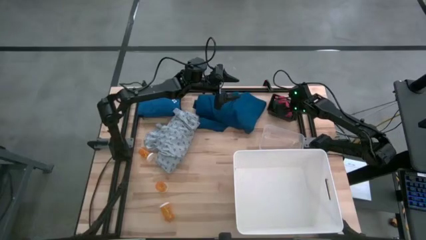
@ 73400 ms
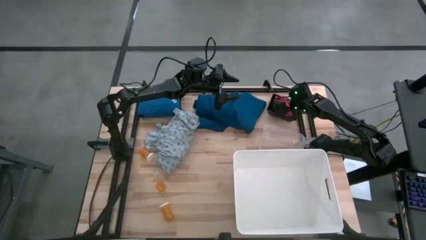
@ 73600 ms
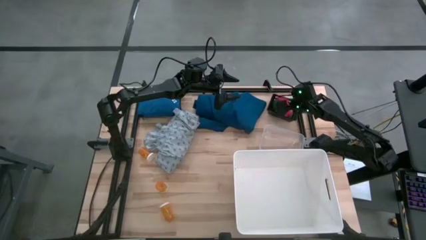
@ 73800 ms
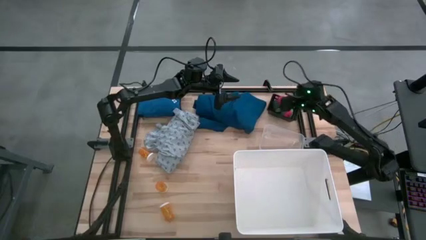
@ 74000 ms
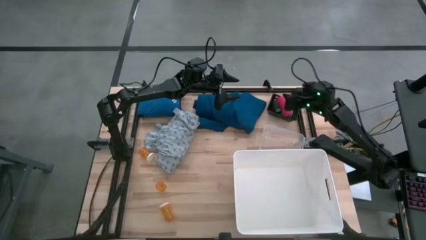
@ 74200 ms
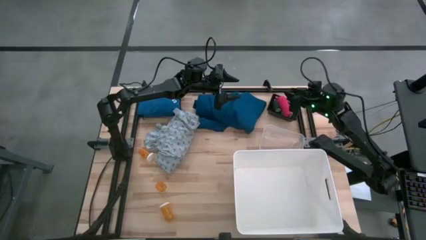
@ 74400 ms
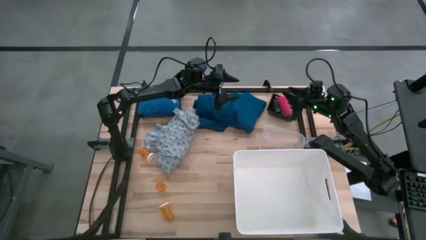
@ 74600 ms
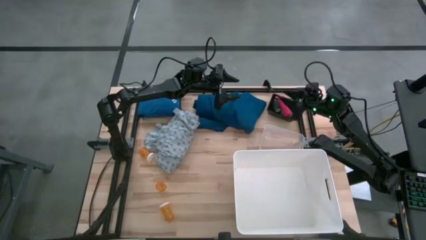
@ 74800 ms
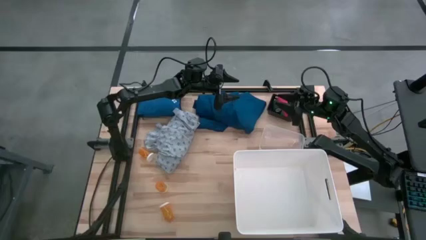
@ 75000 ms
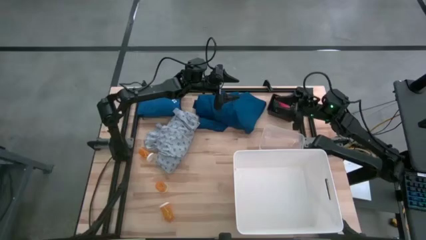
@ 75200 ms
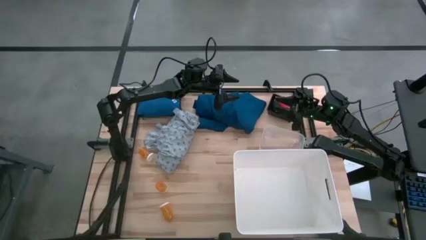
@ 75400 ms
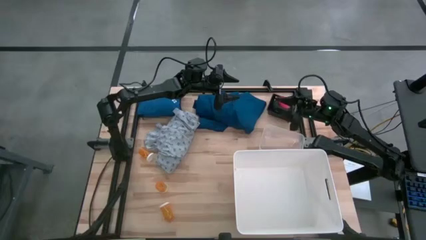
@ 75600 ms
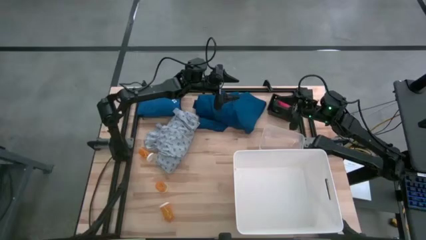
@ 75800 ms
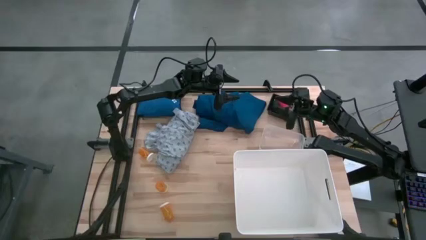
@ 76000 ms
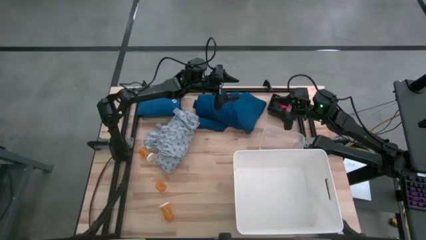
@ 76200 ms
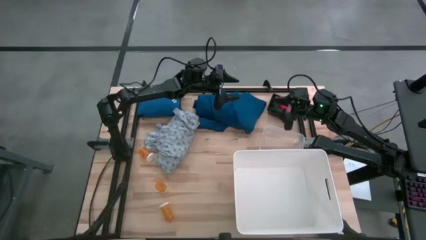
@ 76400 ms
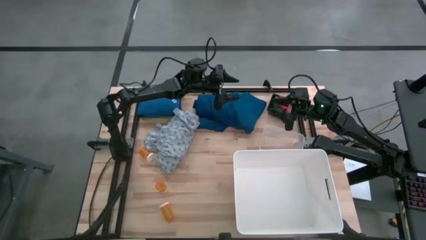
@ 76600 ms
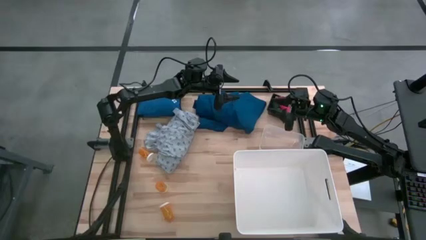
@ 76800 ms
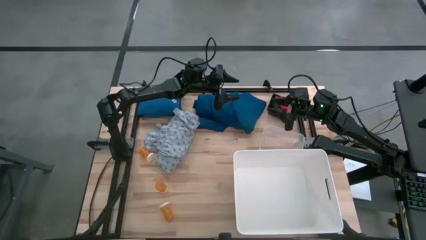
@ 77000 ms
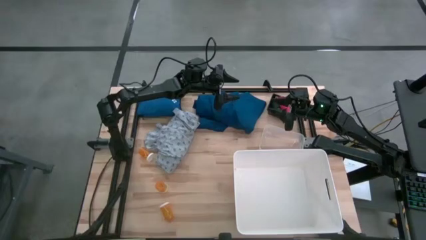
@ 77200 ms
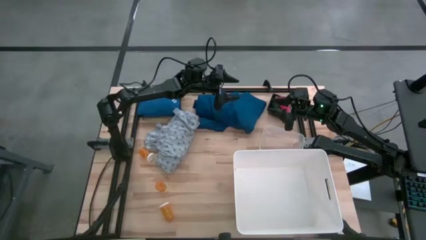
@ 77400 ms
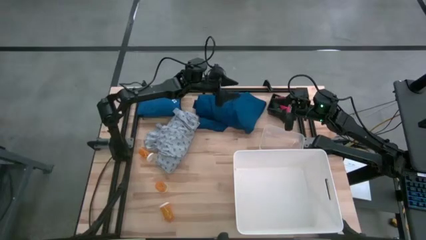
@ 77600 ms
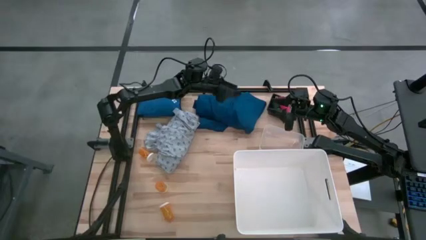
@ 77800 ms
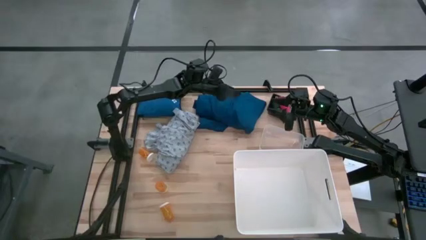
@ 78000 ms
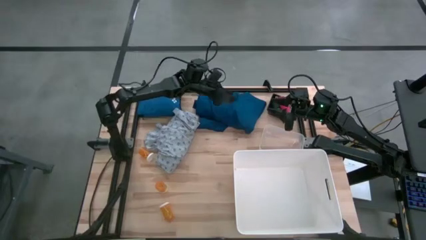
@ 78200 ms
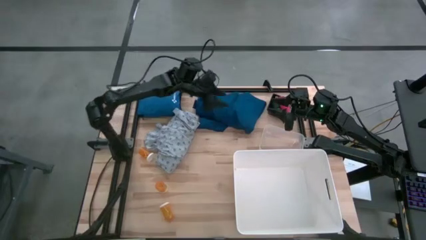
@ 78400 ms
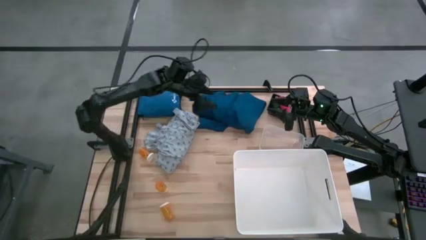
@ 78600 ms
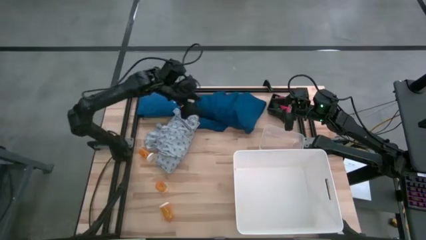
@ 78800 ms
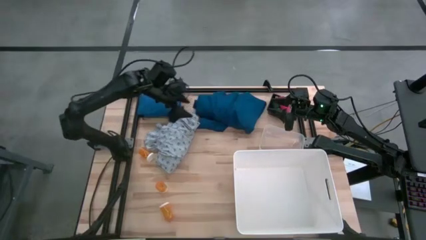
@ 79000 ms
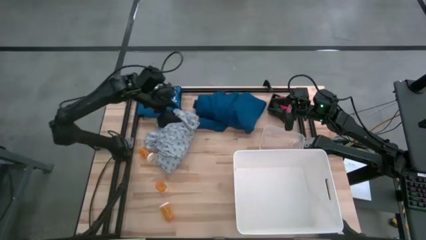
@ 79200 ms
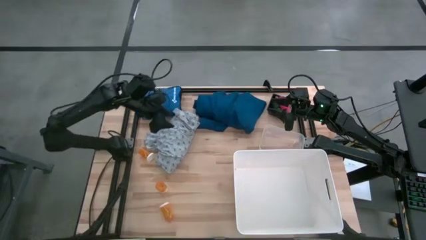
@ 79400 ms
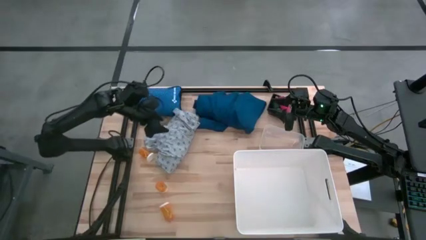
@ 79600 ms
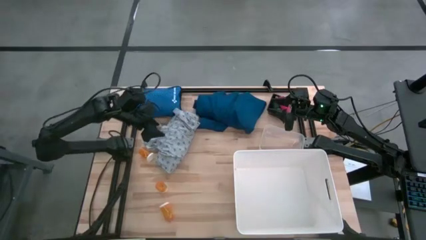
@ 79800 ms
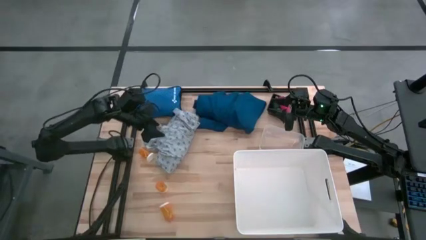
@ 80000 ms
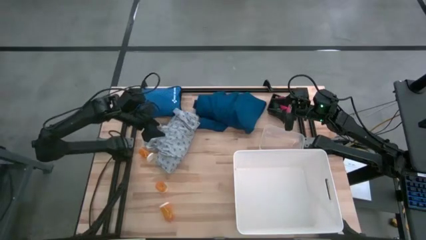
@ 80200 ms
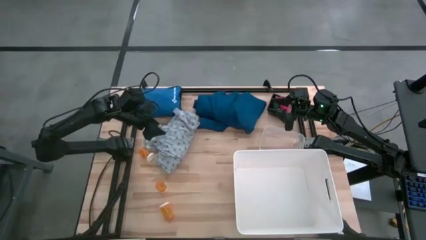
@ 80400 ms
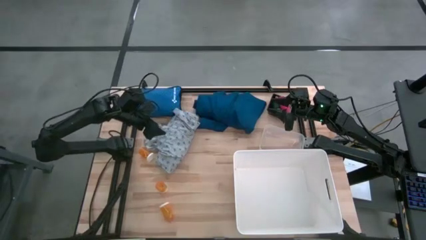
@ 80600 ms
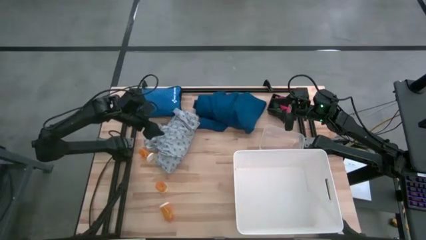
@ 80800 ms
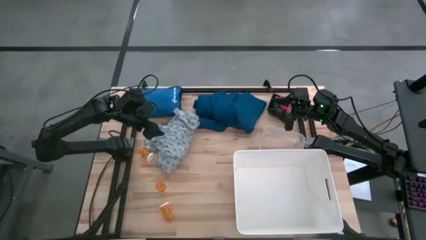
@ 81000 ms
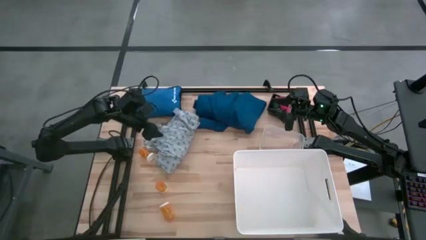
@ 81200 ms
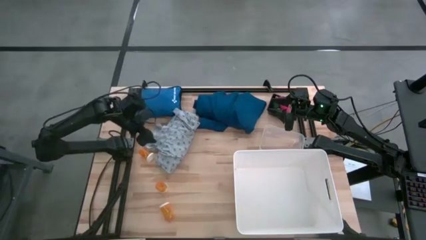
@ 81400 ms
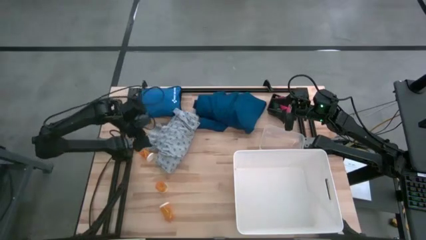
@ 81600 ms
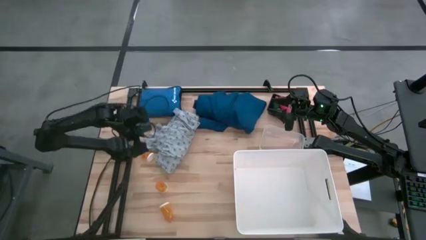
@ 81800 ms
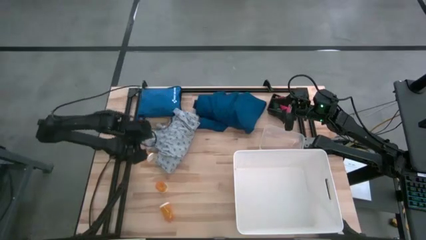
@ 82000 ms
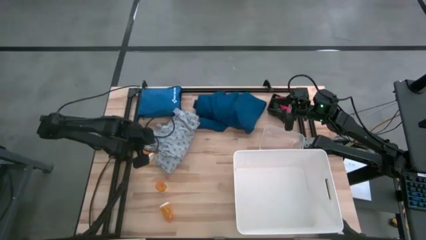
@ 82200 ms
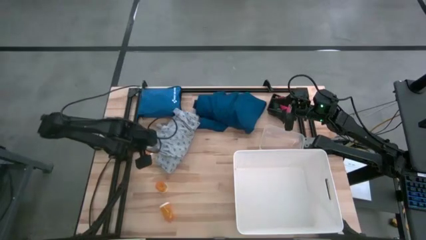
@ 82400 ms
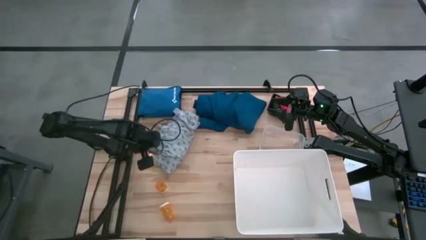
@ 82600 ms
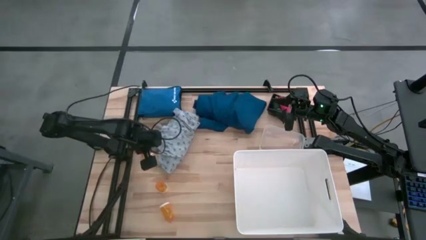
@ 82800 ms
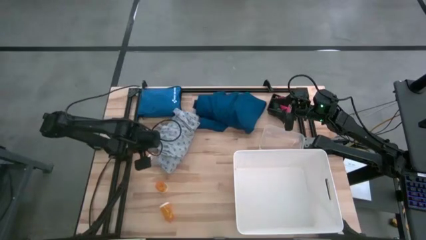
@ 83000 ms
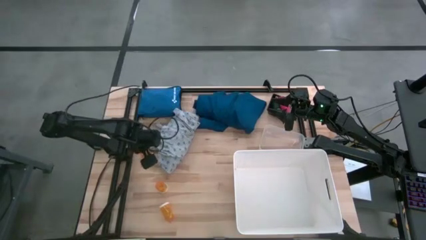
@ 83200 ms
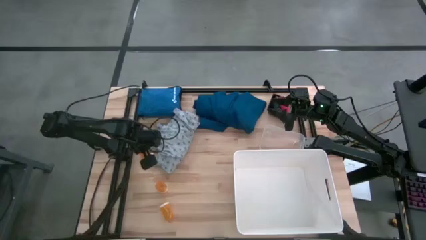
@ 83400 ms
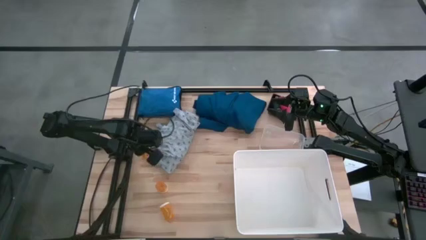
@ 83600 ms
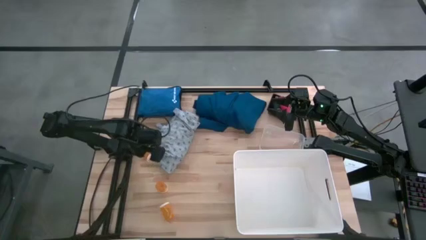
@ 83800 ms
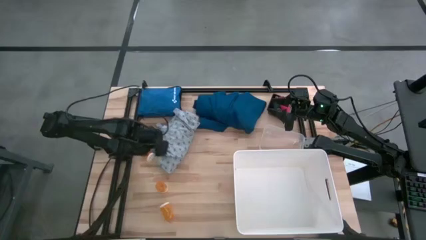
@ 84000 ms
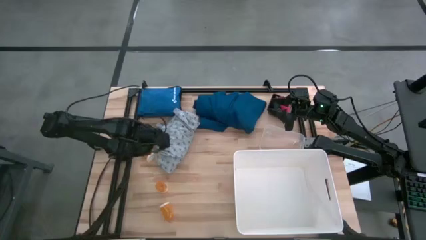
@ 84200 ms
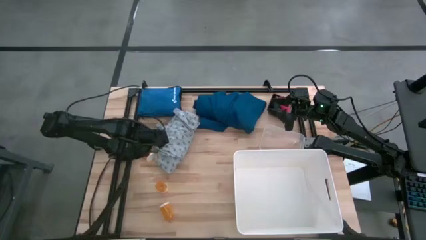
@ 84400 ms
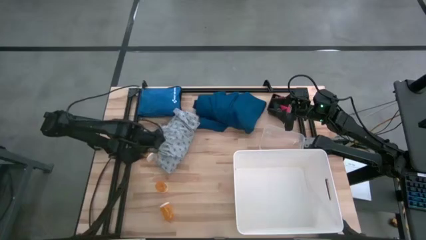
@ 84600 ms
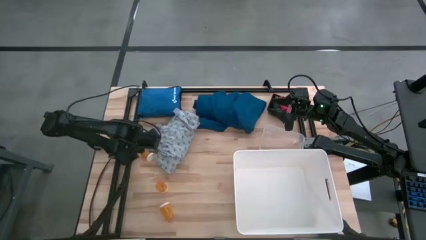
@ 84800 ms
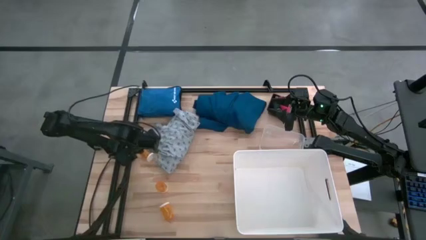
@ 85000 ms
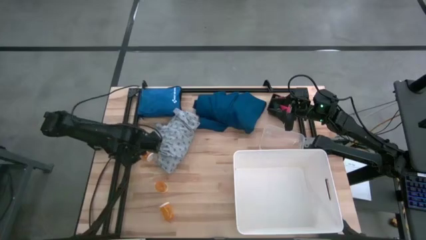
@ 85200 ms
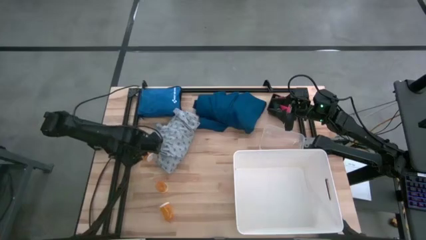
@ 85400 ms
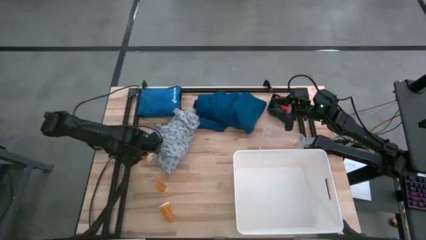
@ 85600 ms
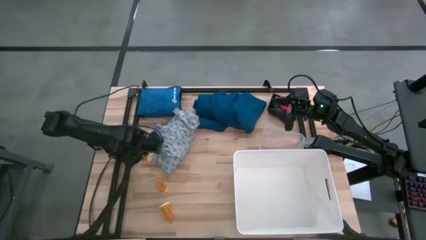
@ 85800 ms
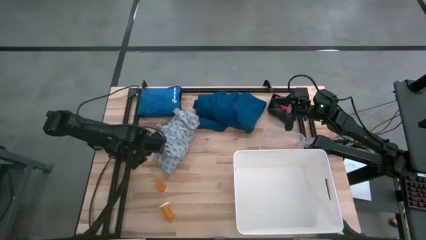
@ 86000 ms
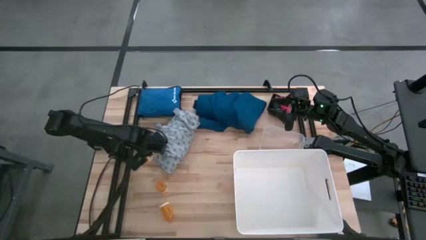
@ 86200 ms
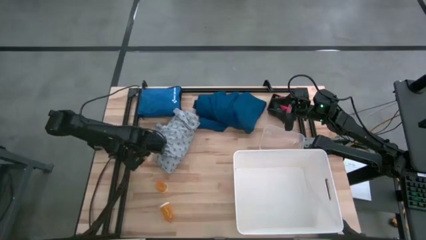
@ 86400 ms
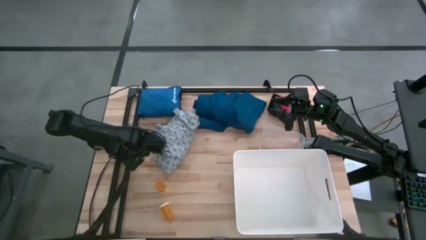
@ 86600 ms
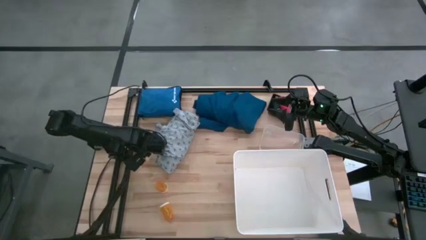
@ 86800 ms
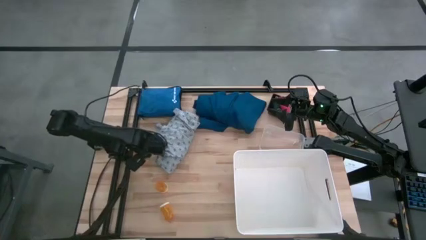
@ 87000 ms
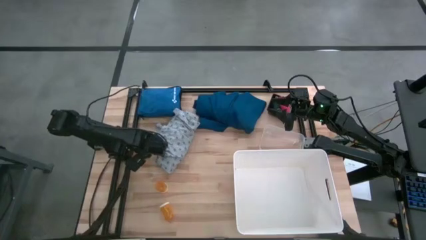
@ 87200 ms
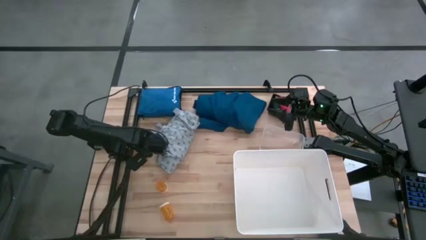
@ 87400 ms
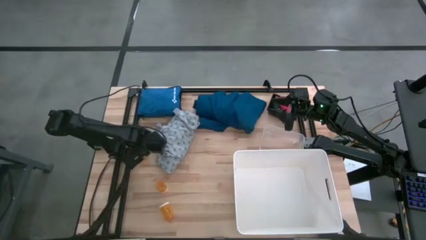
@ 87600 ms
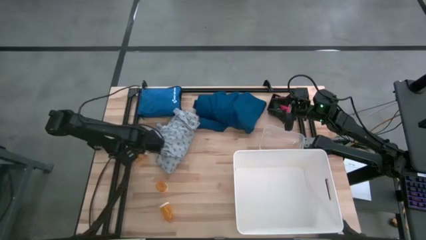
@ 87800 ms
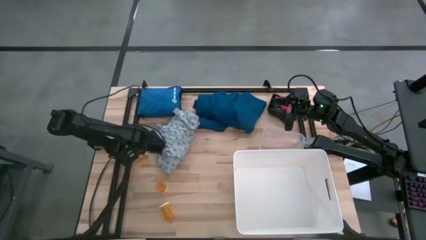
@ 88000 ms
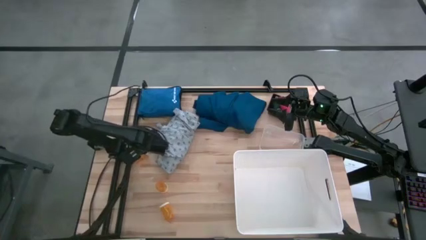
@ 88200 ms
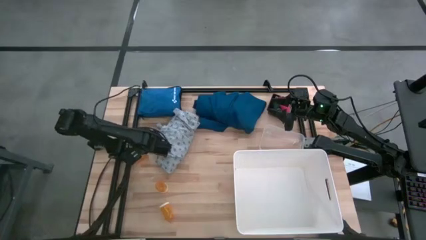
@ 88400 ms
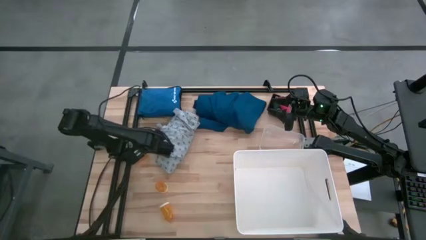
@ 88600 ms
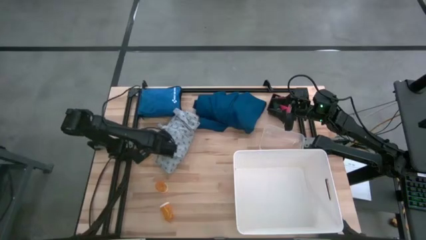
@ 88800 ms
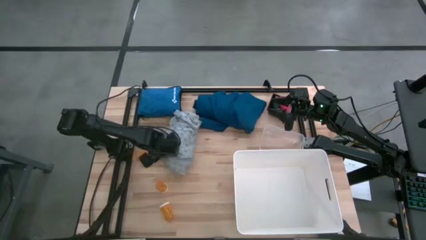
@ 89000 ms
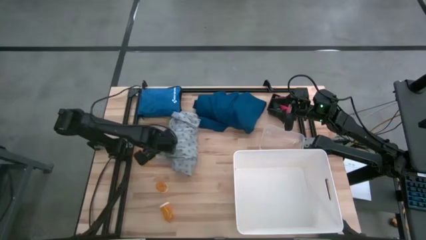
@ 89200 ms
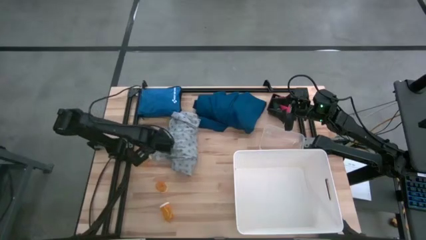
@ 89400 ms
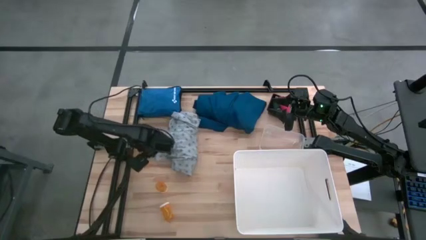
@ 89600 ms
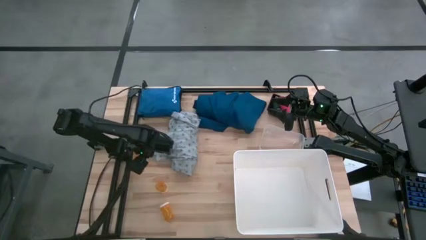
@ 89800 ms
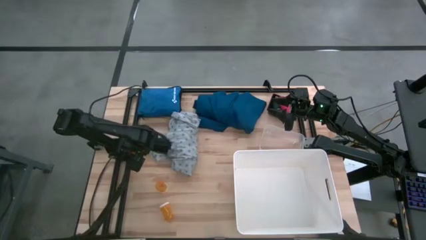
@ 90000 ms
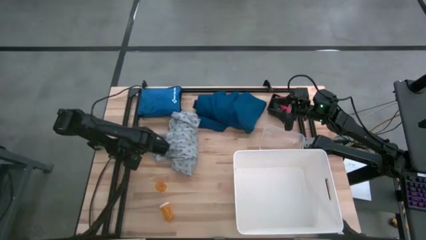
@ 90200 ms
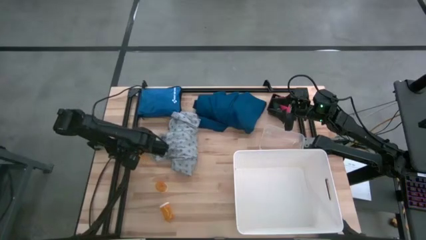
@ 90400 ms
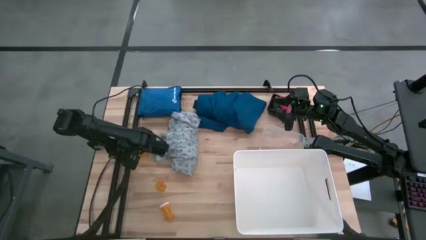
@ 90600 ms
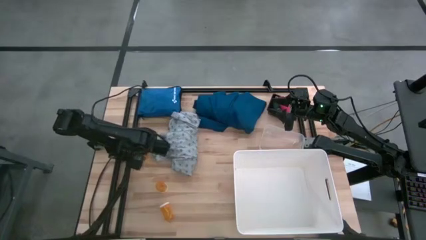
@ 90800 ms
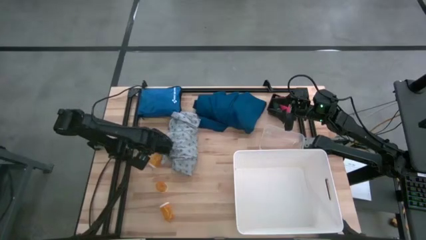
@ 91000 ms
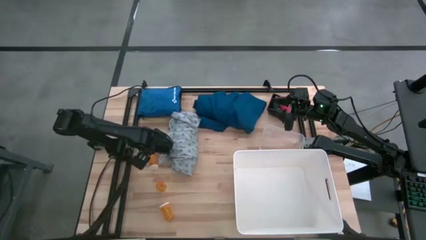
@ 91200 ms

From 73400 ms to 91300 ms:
Task: Pick & place medical supplies in basket/bin
Put the top orange pill bottle into the transparent bin
